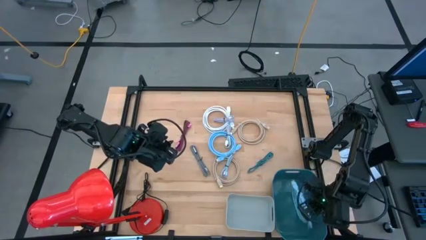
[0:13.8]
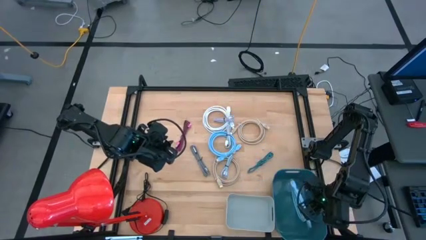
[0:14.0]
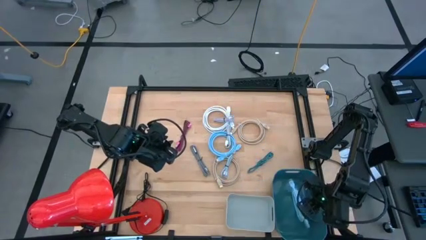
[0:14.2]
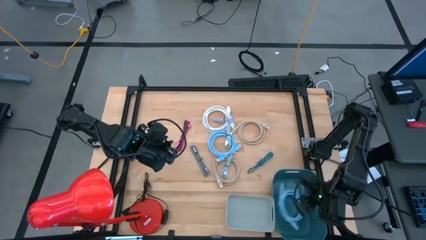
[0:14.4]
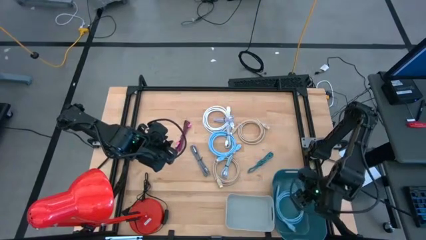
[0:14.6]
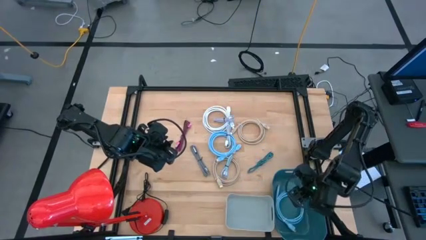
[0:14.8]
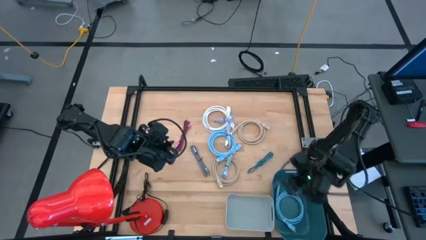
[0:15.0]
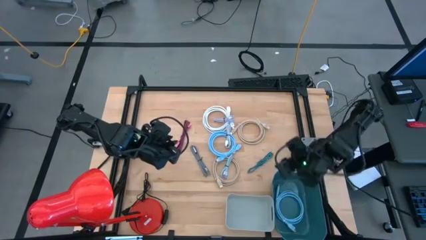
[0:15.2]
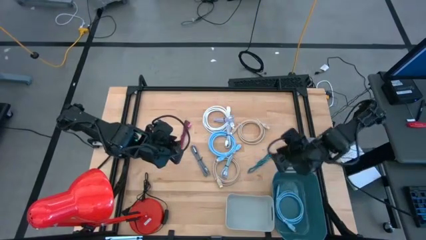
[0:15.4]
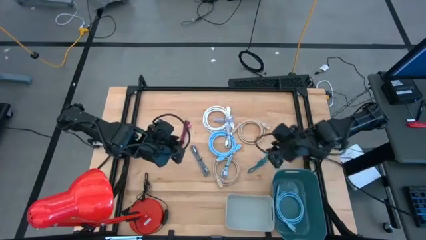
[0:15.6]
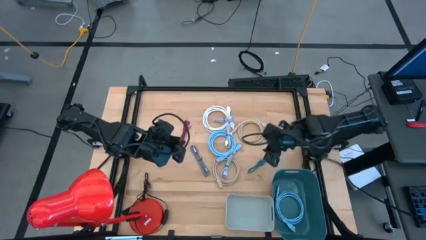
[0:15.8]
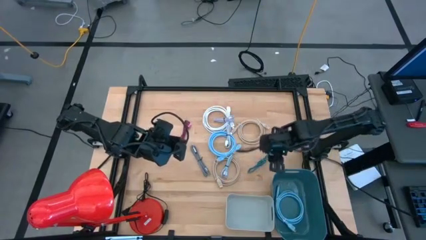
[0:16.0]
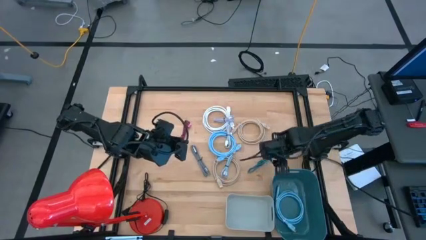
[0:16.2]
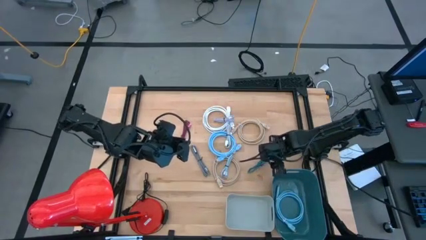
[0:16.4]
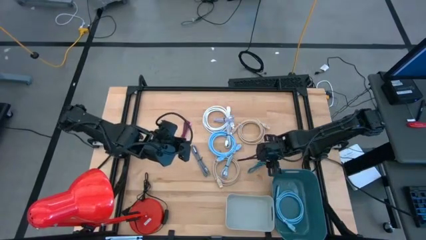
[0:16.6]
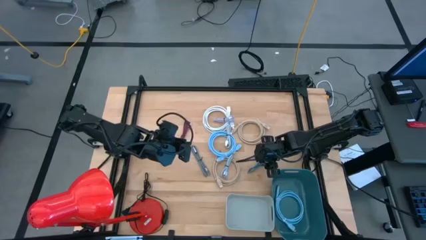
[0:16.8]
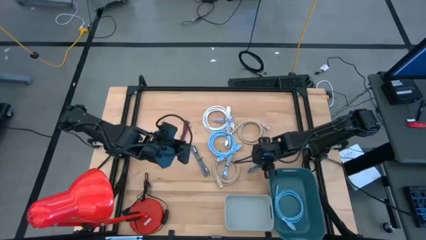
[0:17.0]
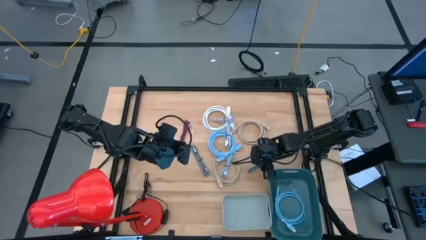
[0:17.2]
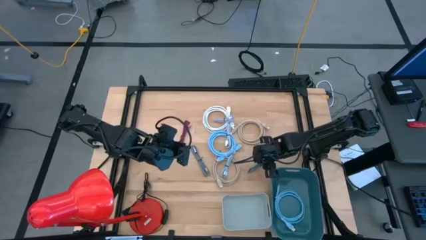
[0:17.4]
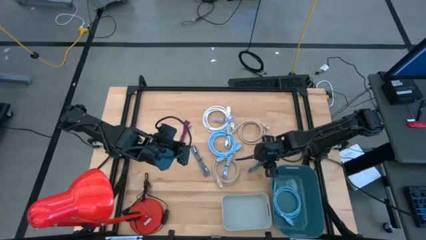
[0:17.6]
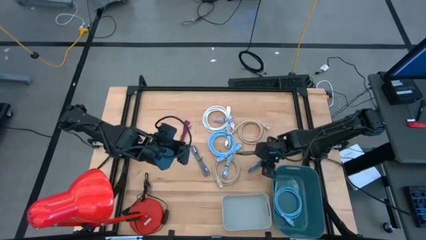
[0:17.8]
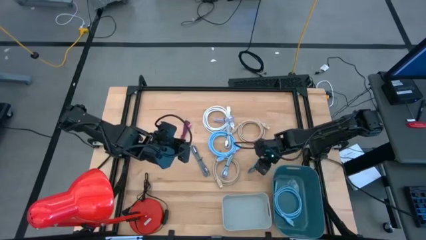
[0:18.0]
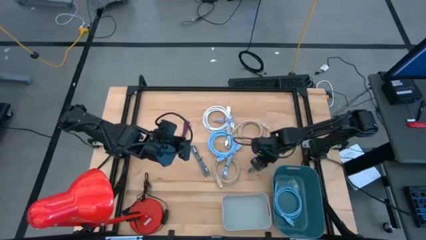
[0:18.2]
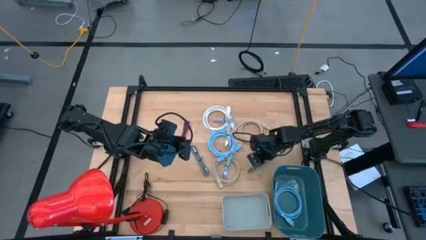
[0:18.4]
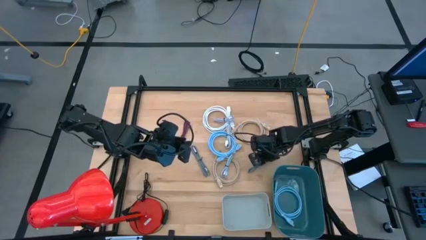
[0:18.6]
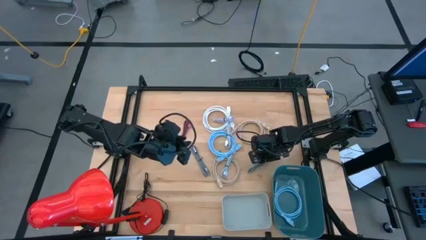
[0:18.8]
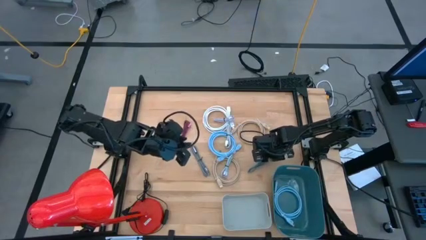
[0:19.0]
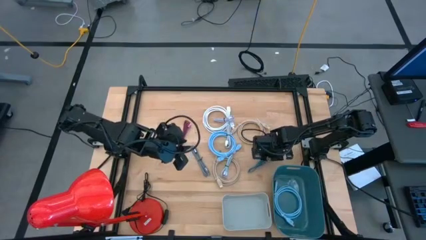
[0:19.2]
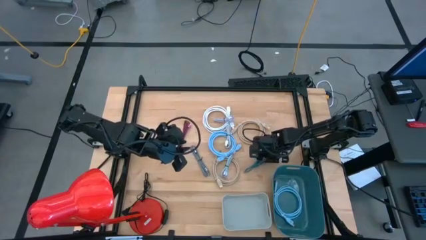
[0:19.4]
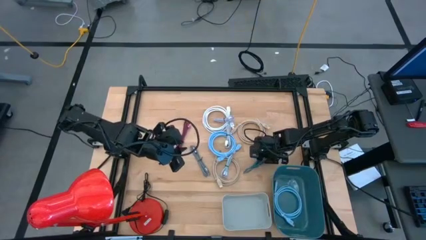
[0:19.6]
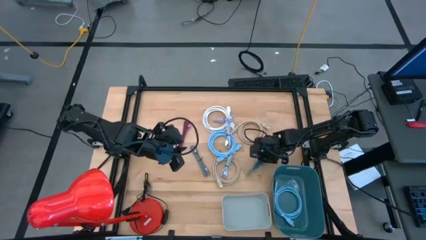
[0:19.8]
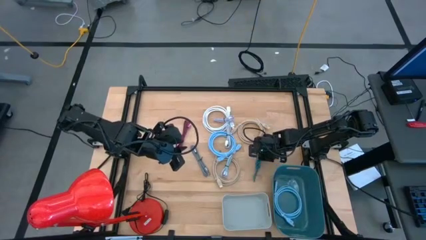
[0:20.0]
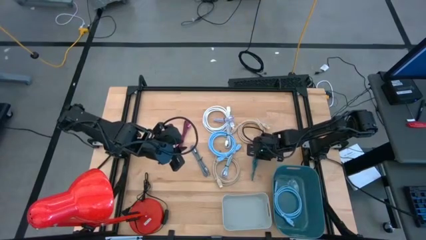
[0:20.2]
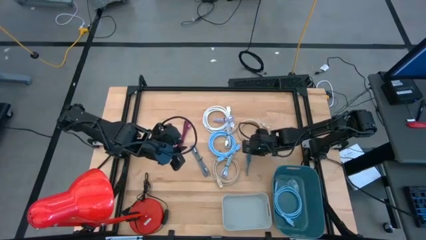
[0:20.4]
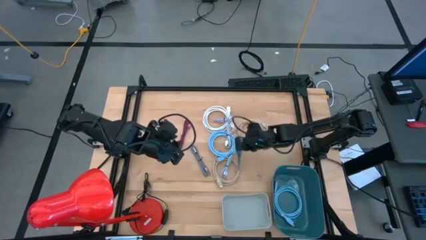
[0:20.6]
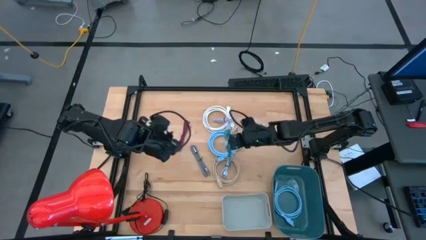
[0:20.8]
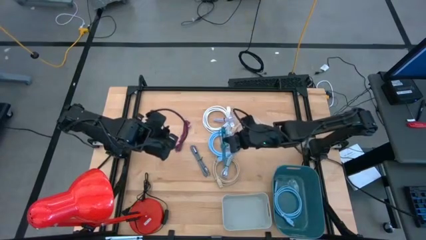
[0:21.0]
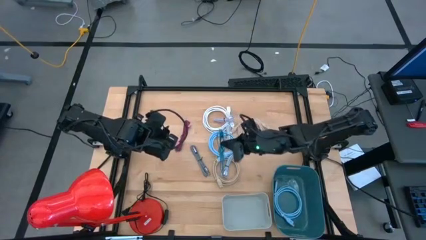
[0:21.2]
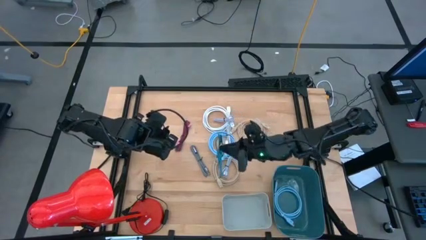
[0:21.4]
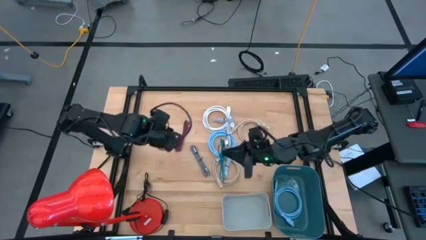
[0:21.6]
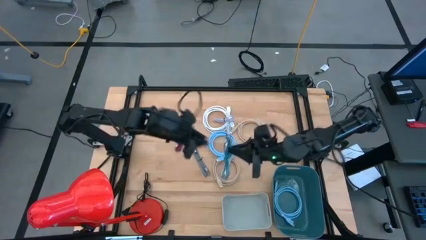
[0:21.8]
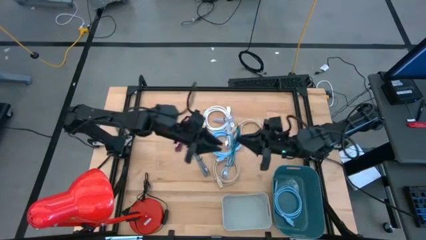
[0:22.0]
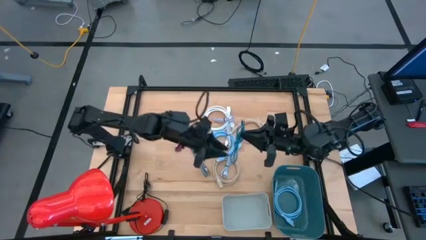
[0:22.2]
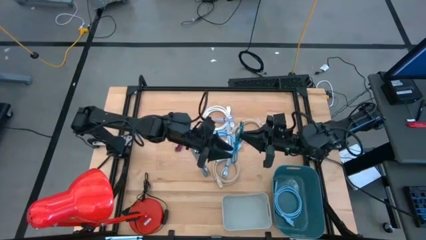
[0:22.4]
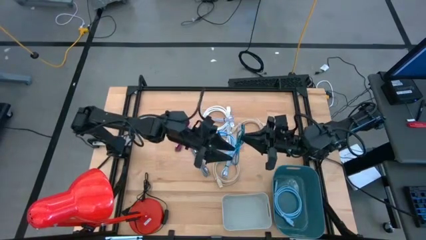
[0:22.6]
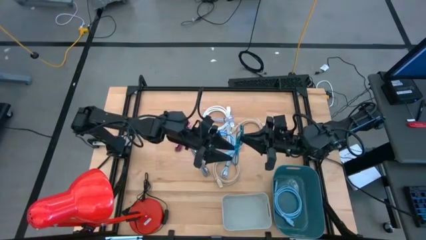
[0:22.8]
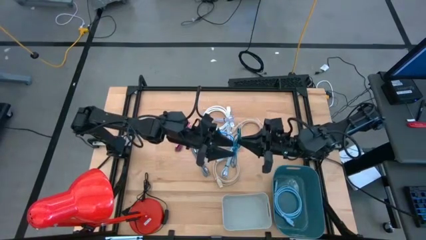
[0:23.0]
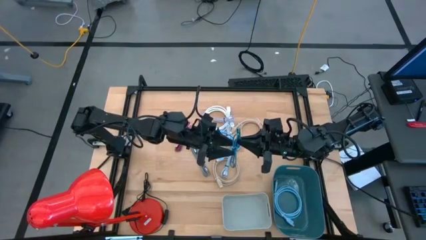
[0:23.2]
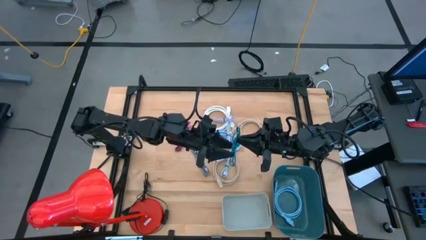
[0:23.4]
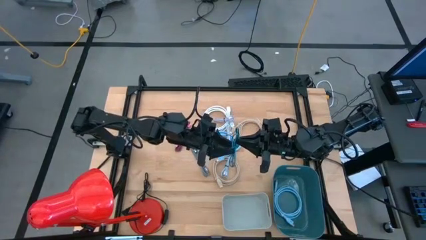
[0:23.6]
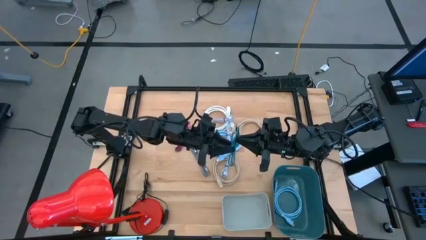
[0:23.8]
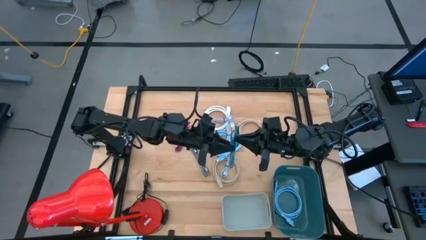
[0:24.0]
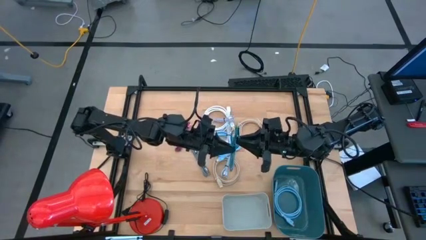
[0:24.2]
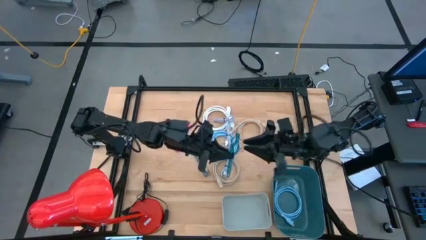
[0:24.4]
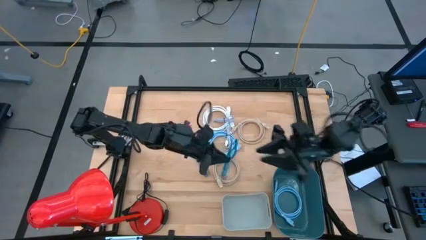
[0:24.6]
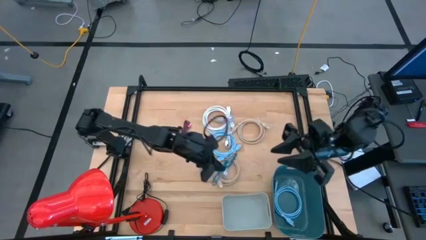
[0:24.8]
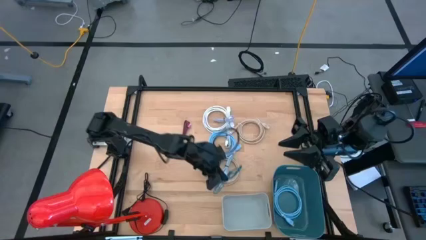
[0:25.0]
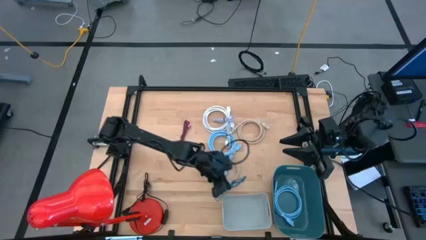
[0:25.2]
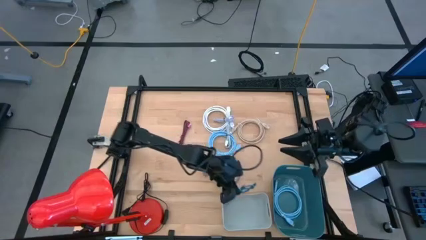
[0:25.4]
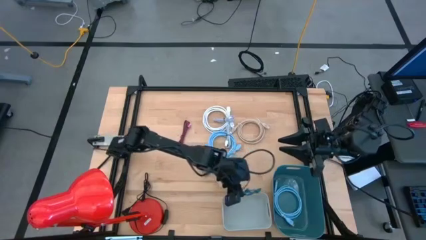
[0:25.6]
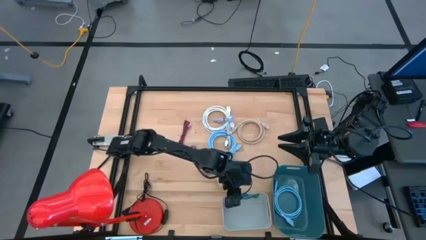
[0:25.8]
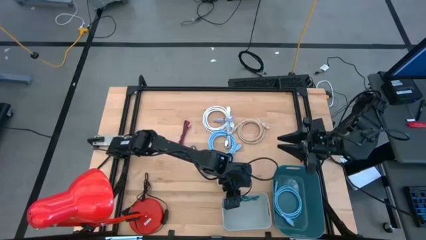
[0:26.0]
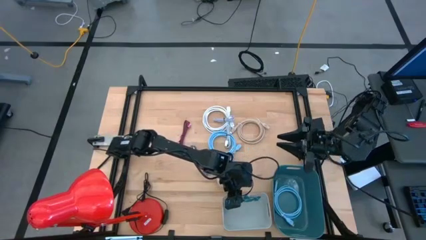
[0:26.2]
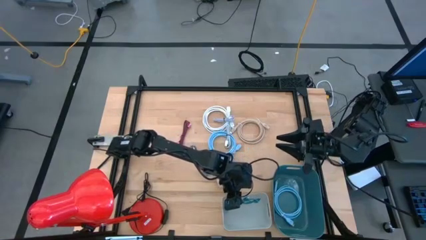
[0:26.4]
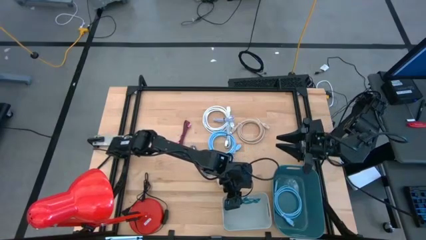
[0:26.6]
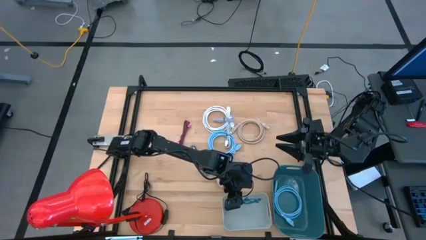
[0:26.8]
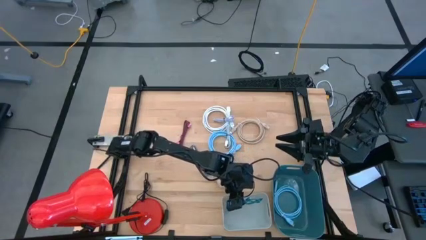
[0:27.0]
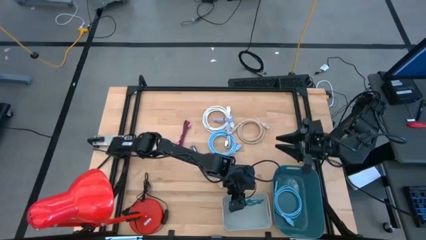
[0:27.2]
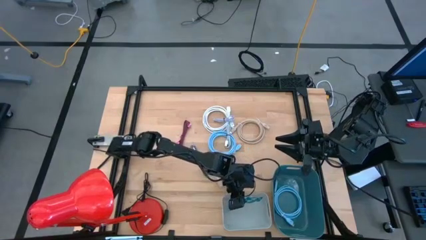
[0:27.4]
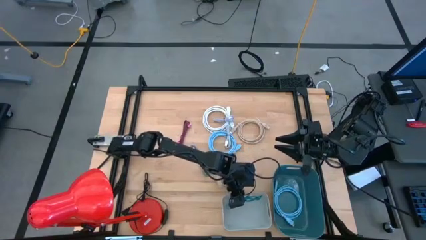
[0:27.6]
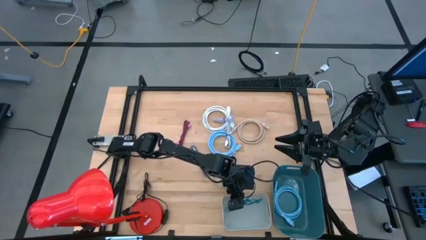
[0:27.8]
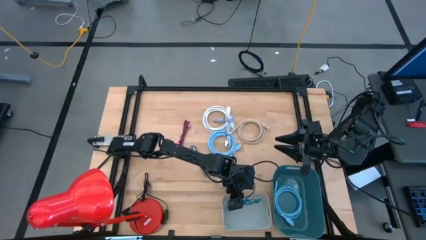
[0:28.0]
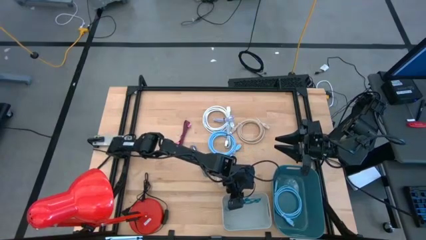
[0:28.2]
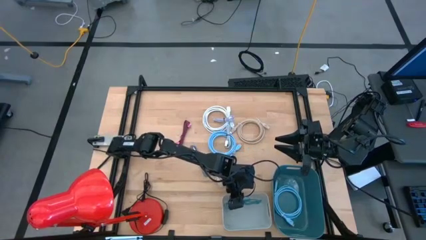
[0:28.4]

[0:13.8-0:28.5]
Task: Pick & Place USB Port
Put the blue and black USB cable into the gray bin
